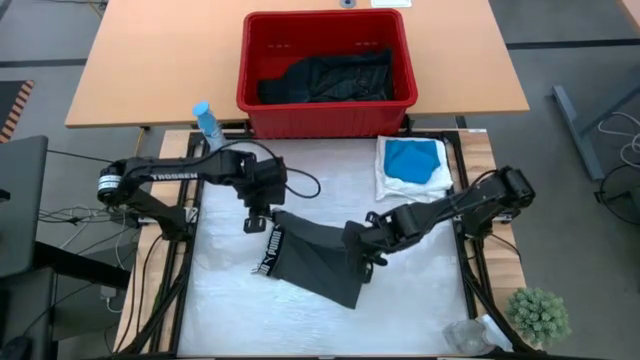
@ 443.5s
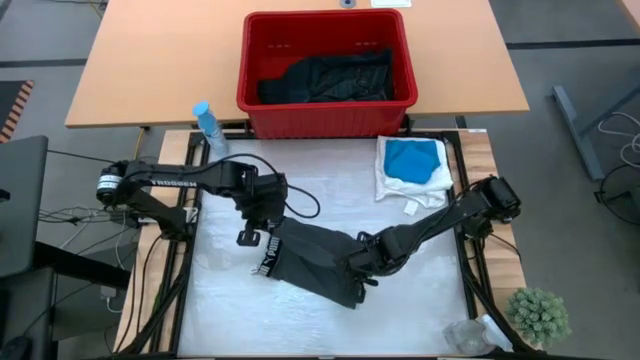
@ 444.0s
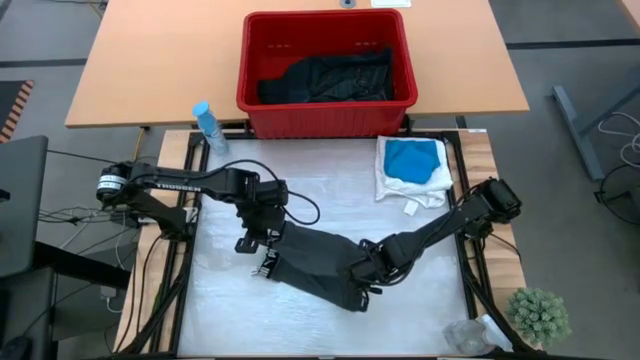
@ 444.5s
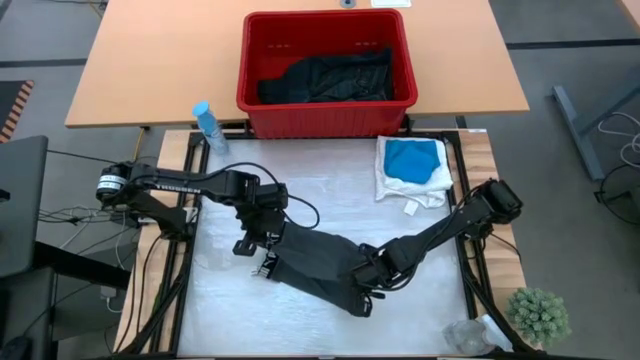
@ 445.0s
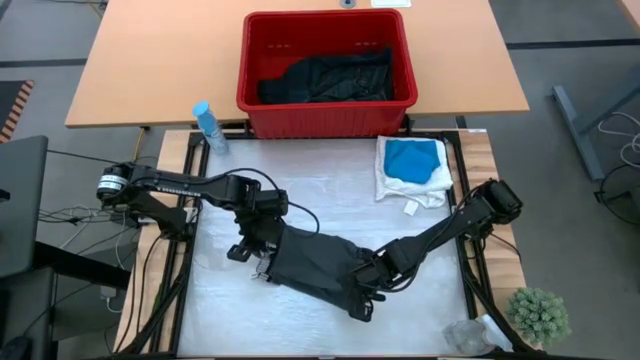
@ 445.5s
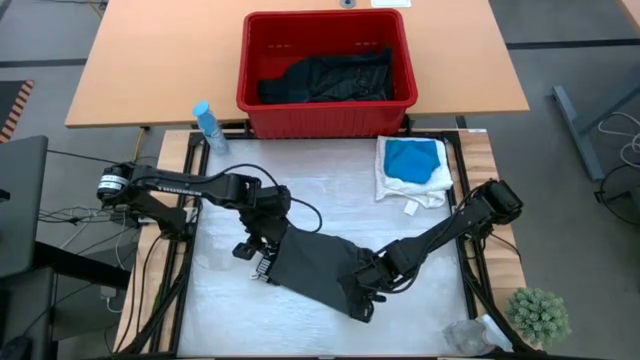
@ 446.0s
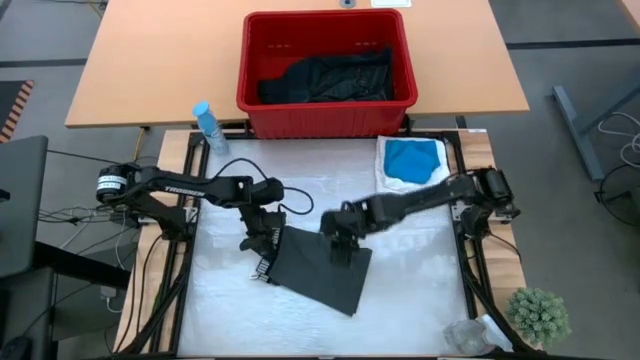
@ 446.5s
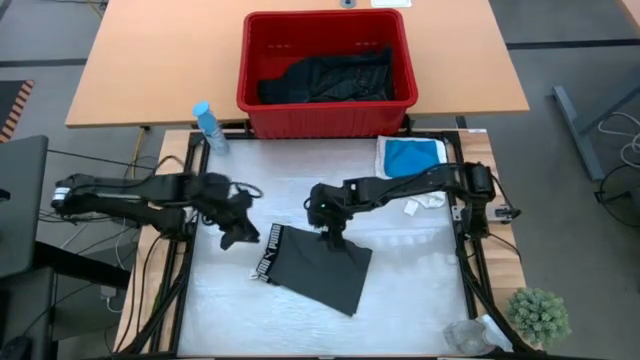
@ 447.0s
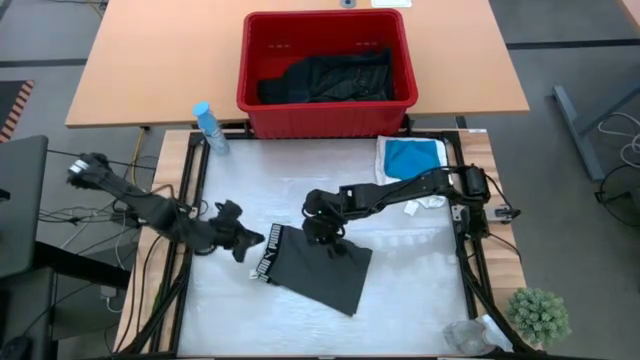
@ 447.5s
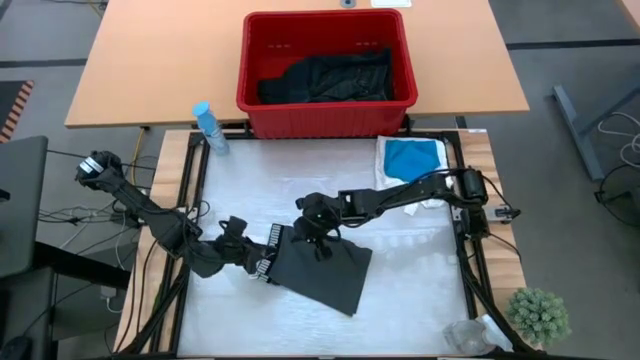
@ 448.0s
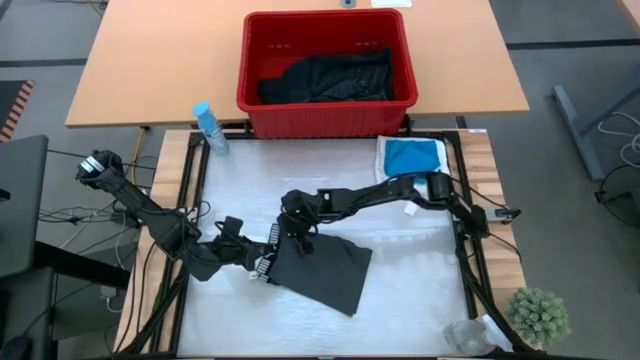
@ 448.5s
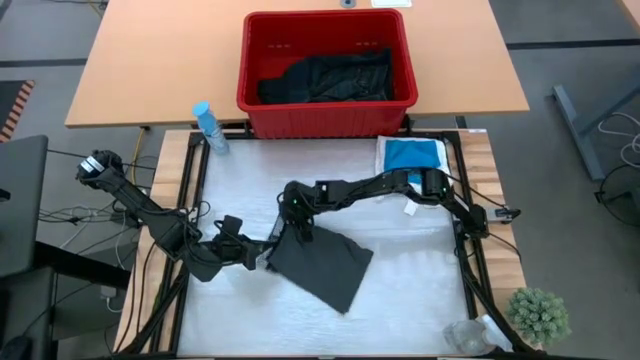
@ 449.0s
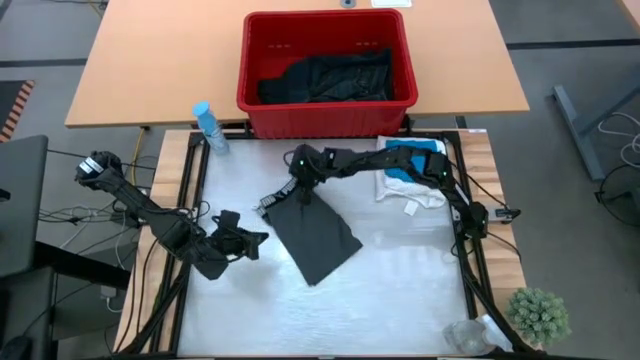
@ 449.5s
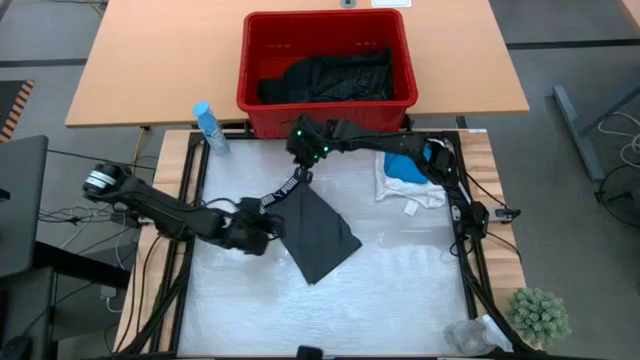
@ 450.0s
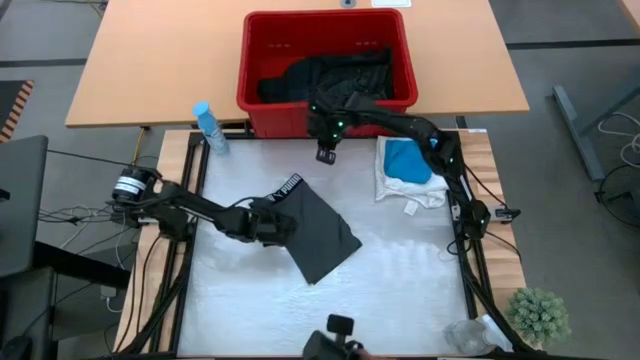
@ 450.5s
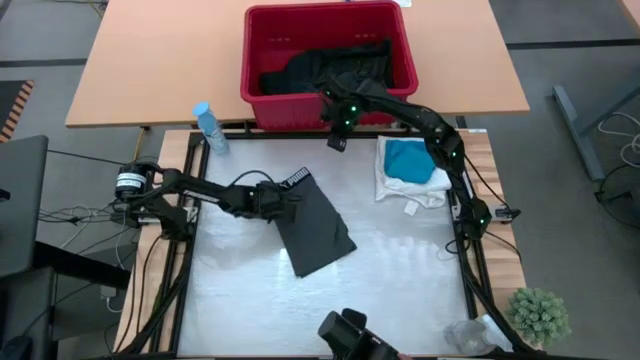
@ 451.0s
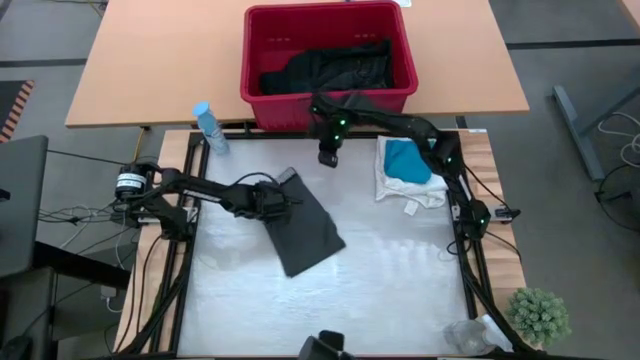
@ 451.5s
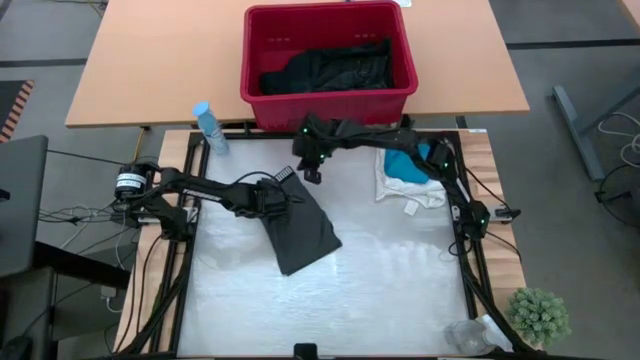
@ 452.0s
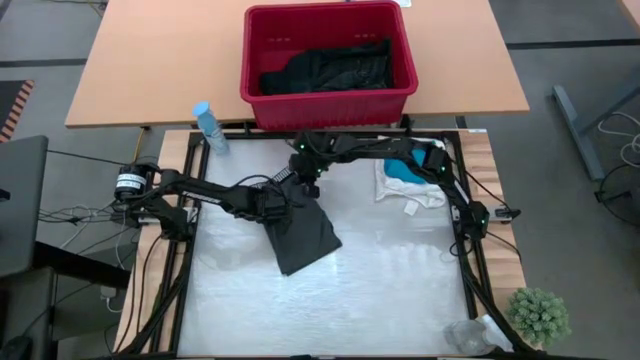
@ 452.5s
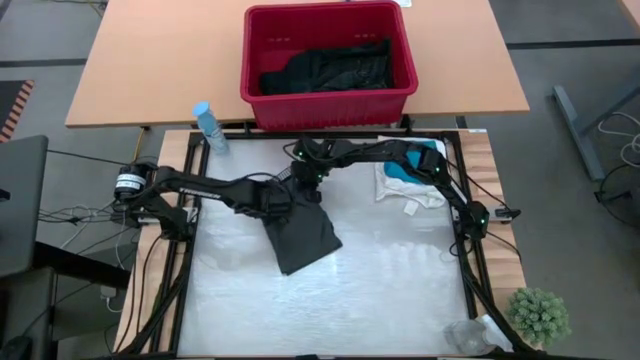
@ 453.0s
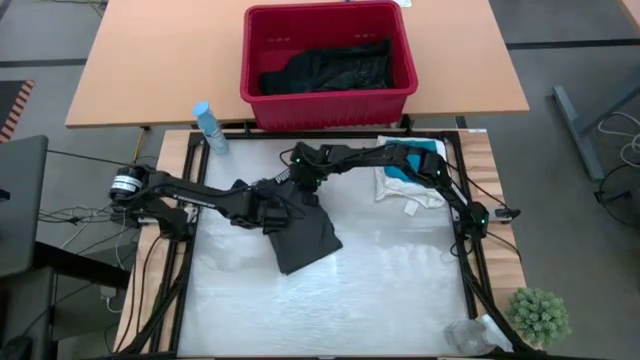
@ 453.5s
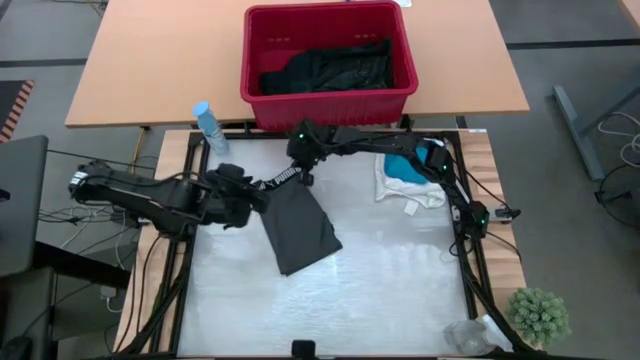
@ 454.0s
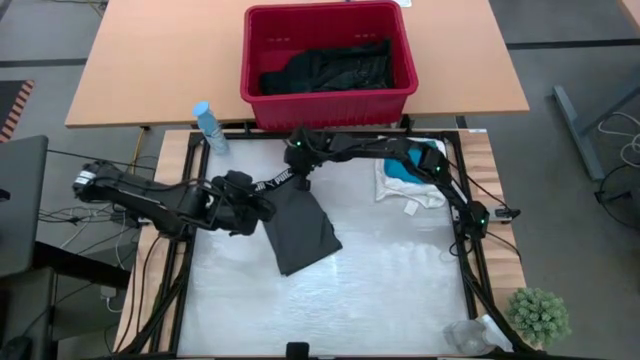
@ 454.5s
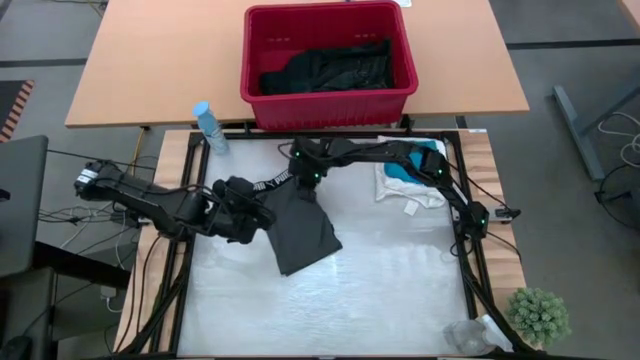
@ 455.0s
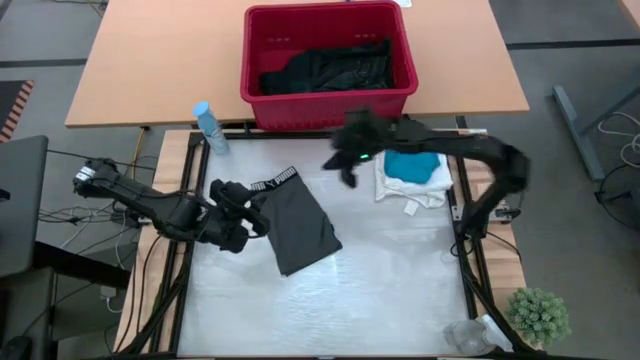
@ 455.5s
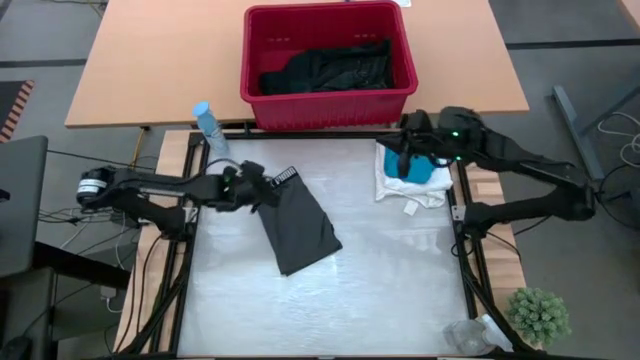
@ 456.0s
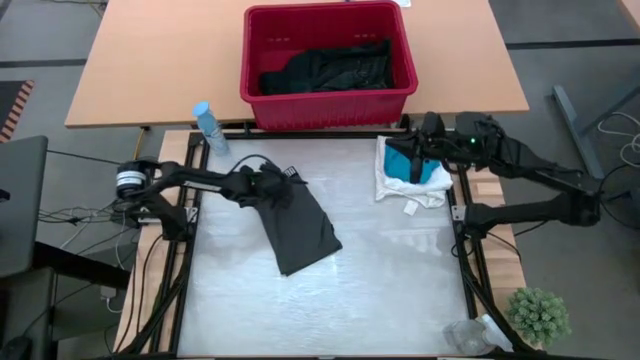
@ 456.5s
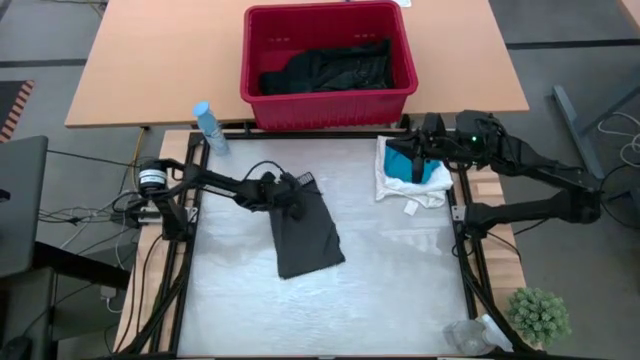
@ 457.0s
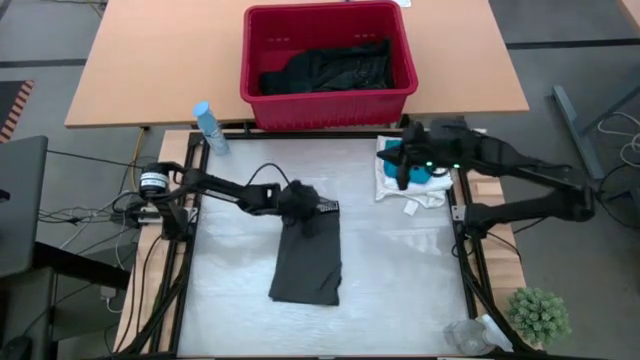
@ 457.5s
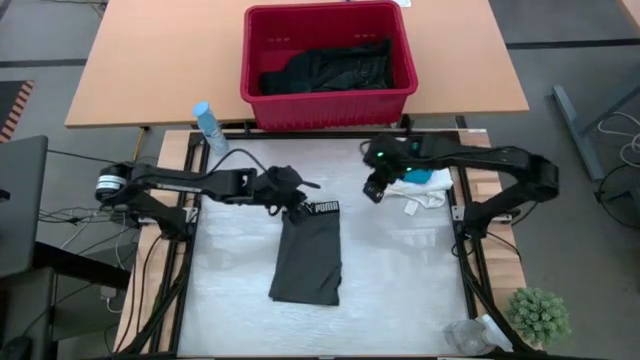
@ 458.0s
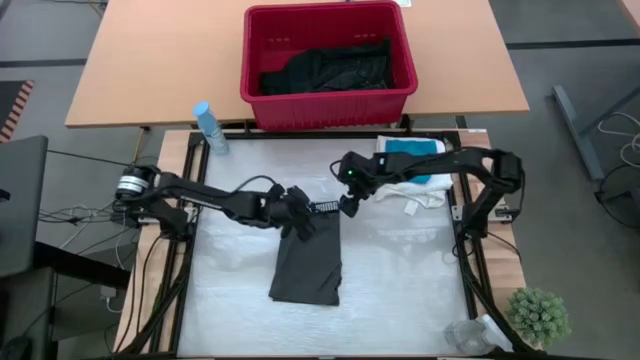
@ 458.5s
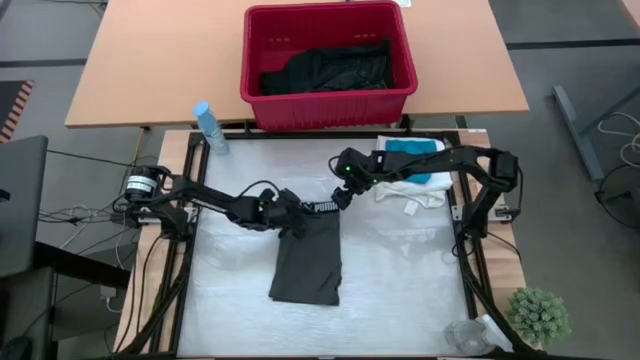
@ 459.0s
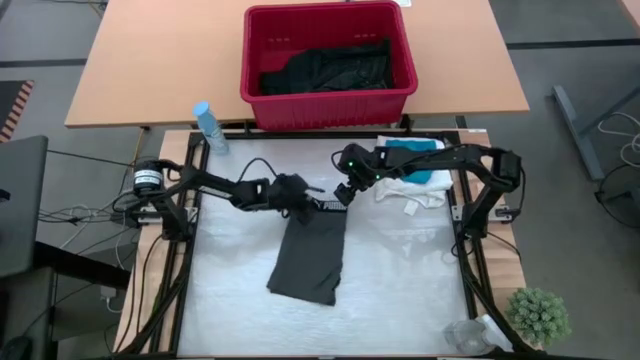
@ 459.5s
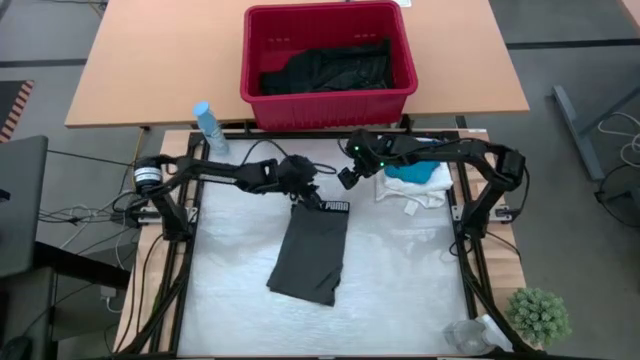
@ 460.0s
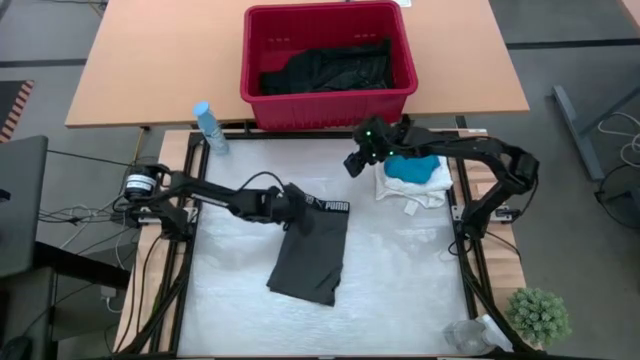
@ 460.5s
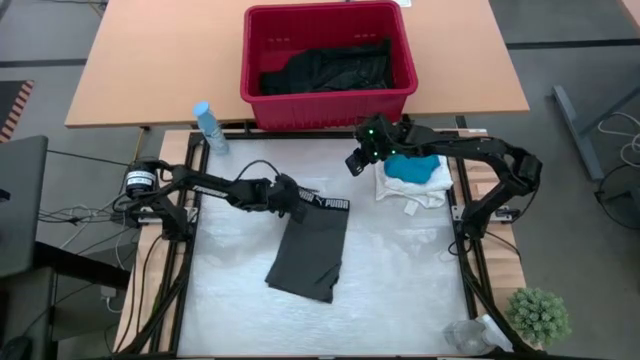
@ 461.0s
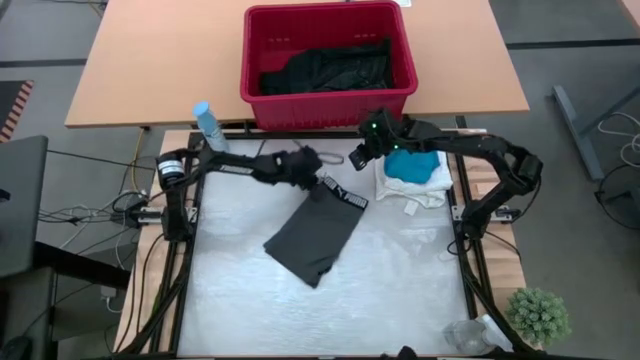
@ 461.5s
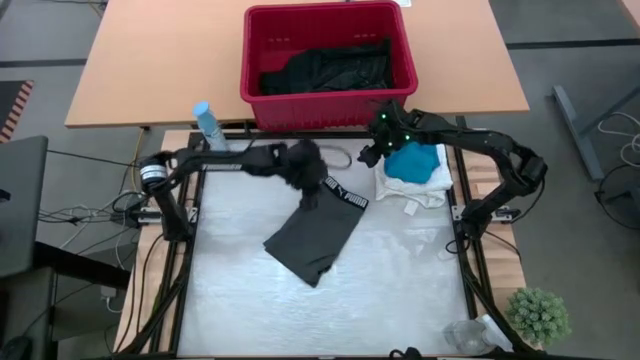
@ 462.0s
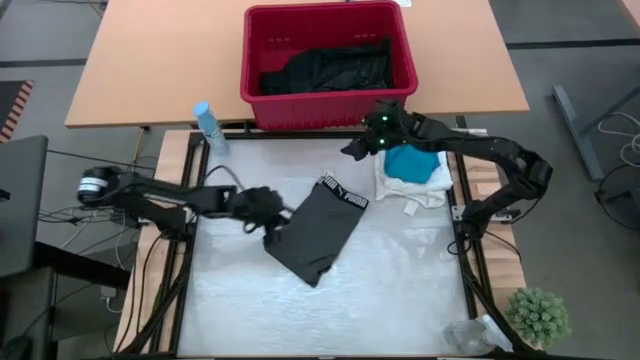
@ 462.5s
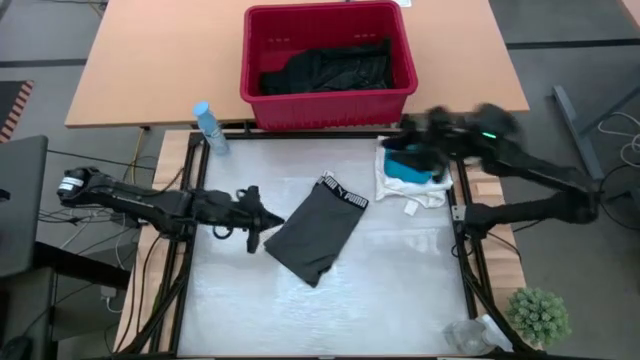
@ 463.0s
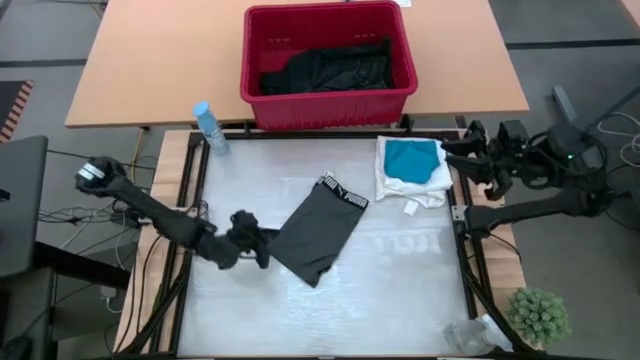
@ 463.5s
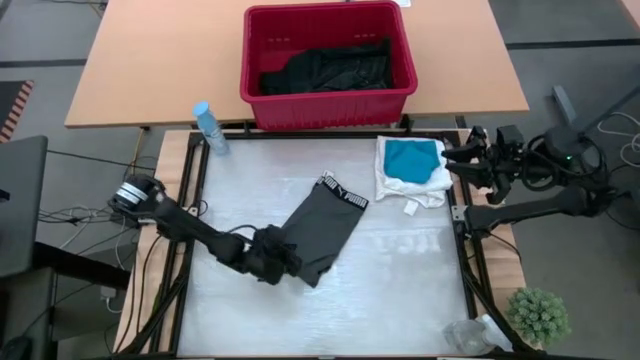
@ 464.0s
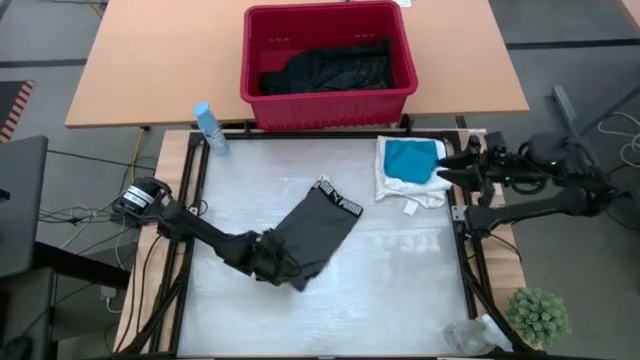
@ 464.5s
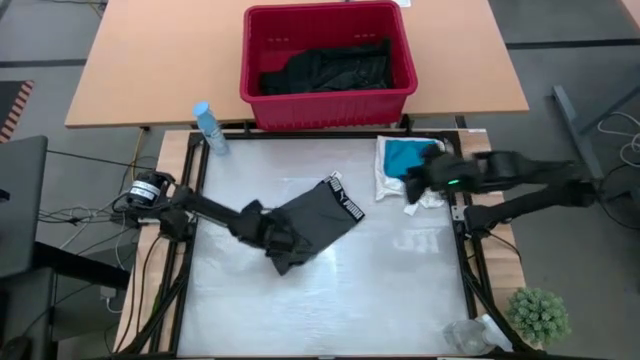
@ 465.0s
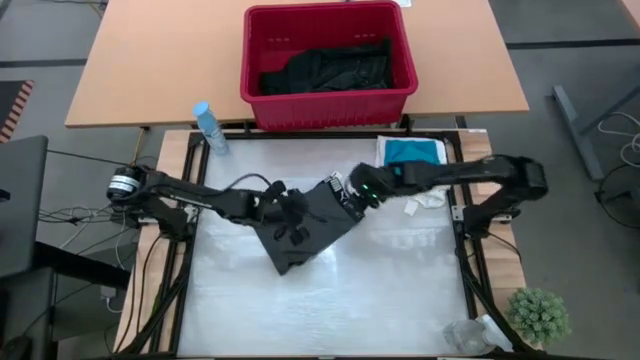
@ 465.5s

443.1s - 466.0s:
Task: Fold laundry
Fold the gray boxers

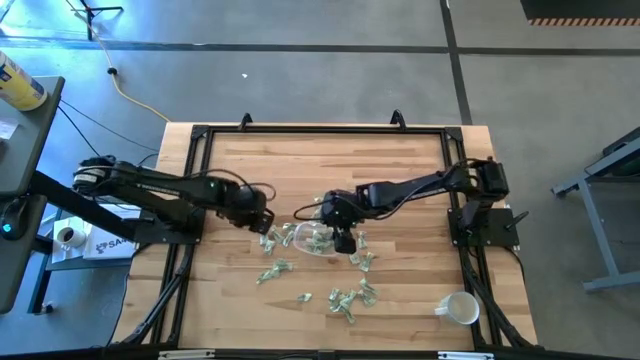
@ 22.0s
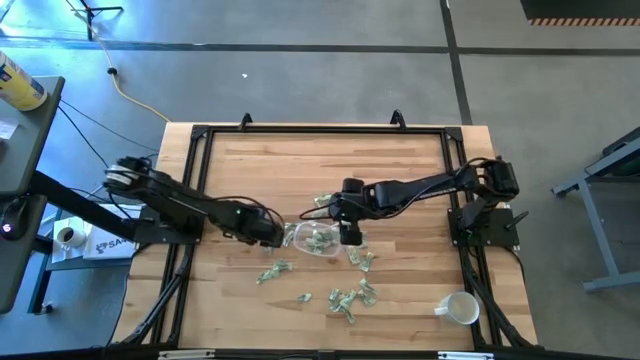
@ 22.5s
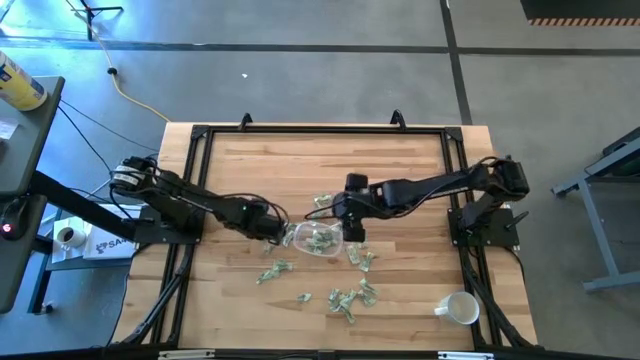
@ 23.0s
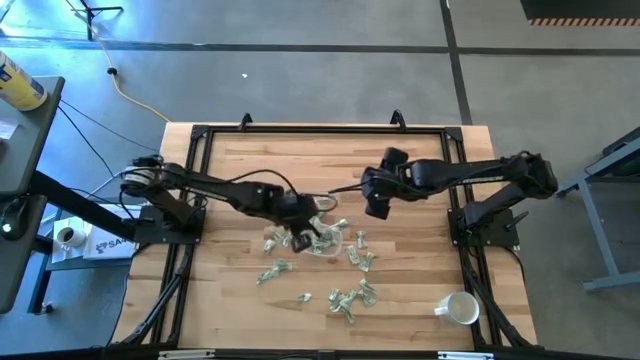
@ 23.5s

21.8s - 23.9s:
Task: Pick and place Stevia / Truvia into bins
Put the green stevia packet into the transparent bin
